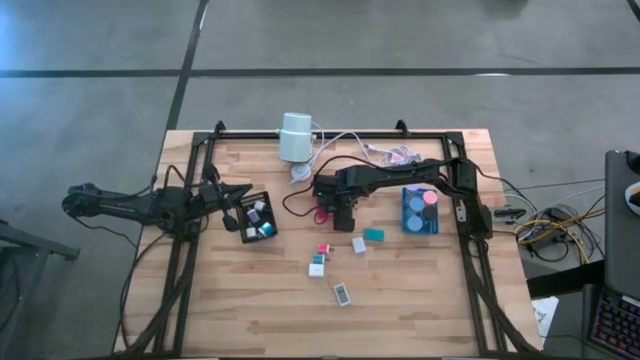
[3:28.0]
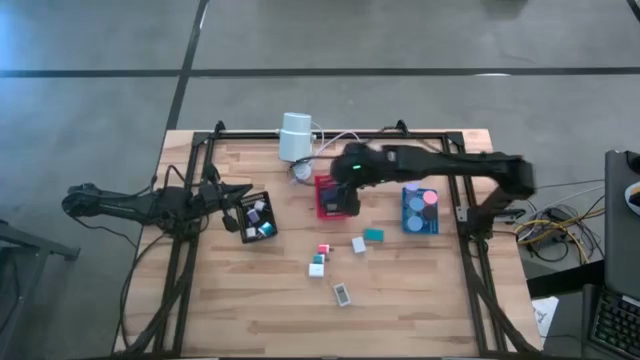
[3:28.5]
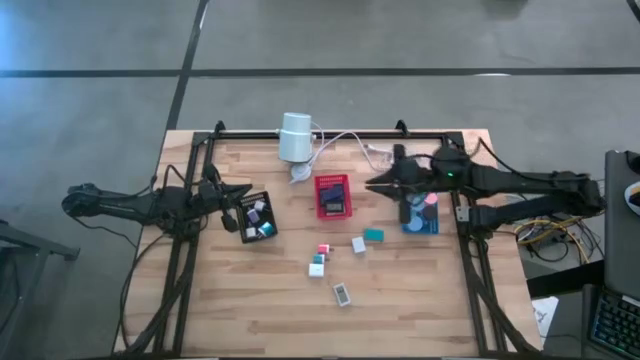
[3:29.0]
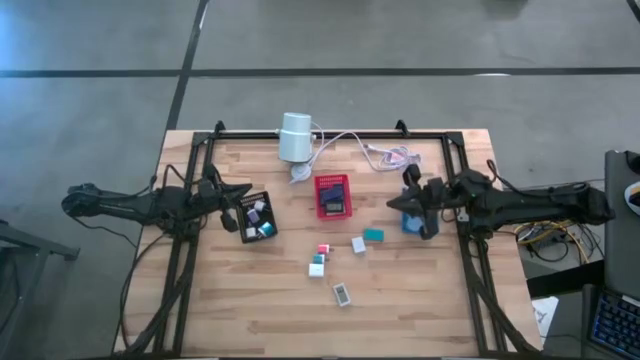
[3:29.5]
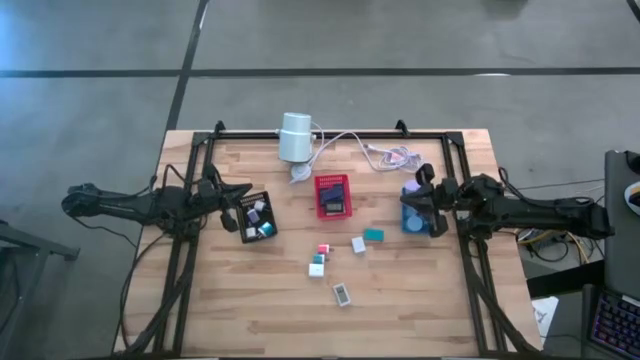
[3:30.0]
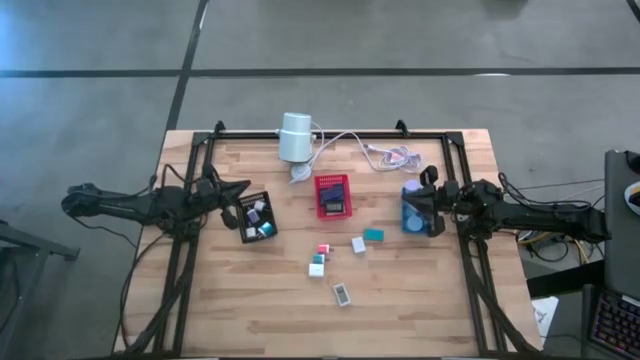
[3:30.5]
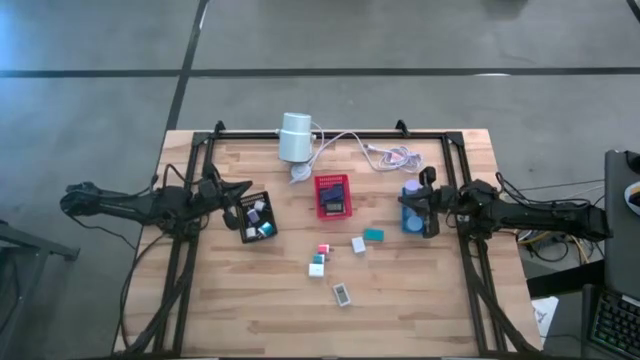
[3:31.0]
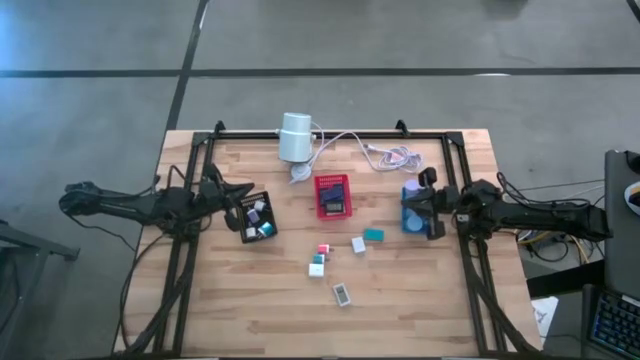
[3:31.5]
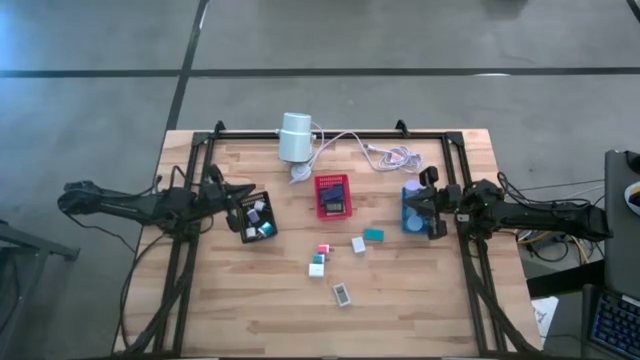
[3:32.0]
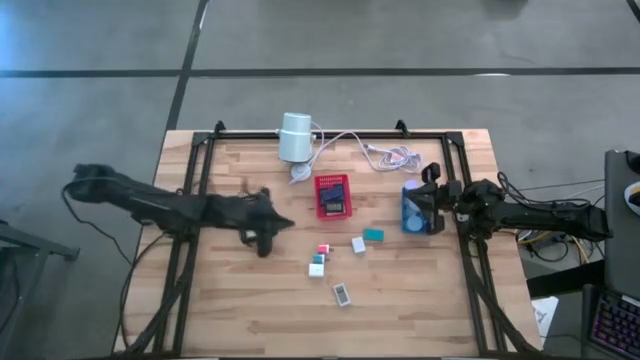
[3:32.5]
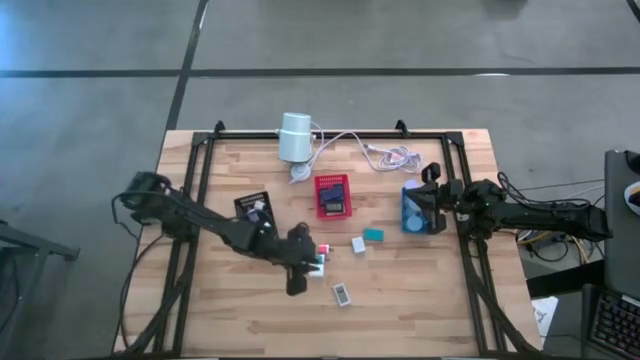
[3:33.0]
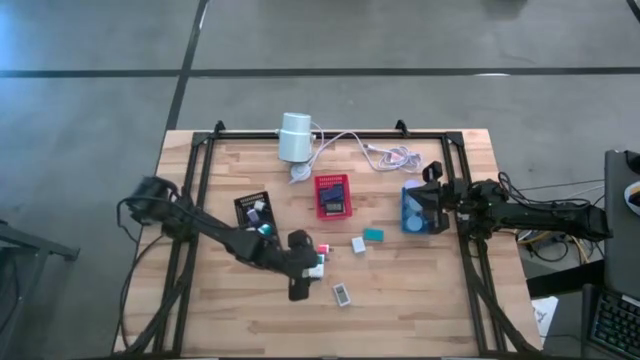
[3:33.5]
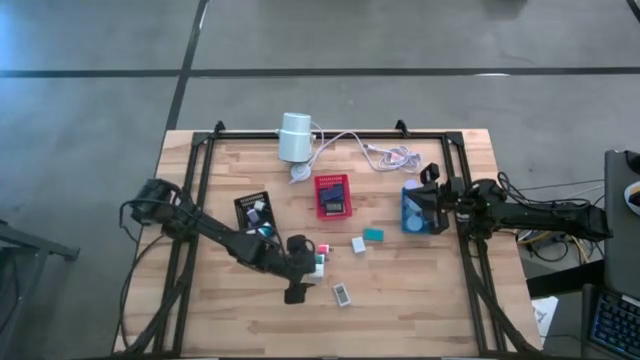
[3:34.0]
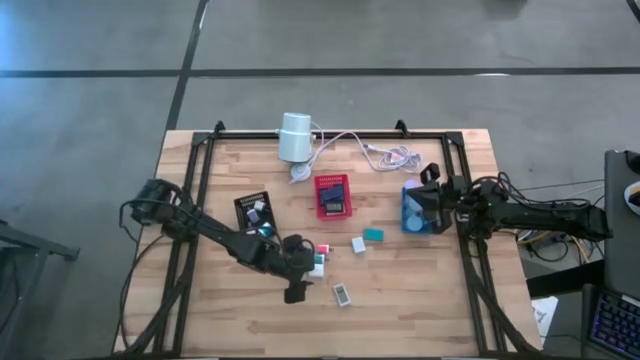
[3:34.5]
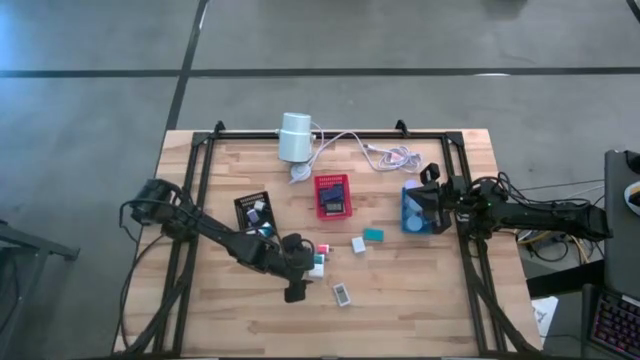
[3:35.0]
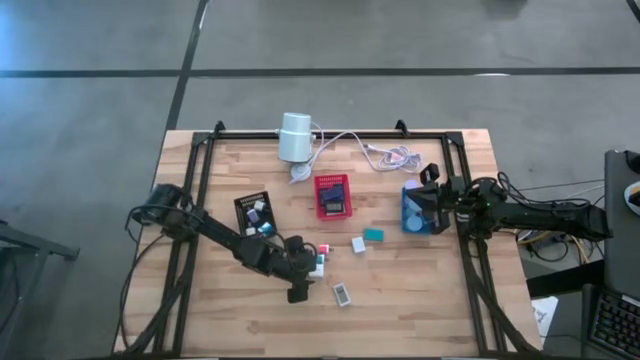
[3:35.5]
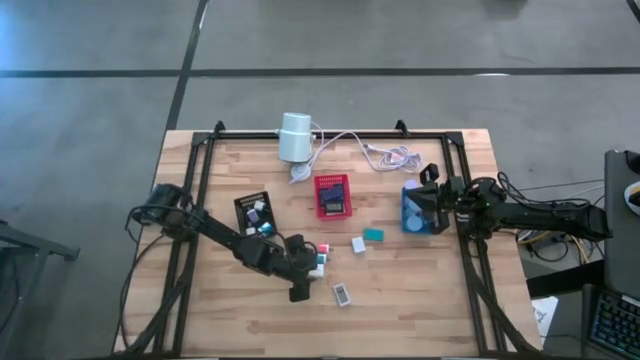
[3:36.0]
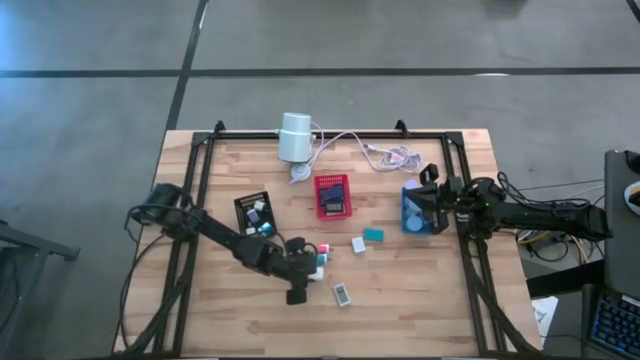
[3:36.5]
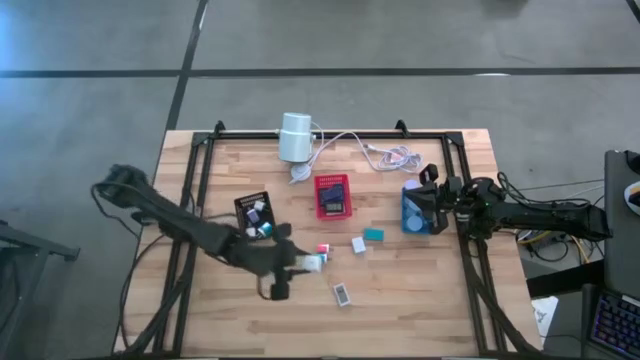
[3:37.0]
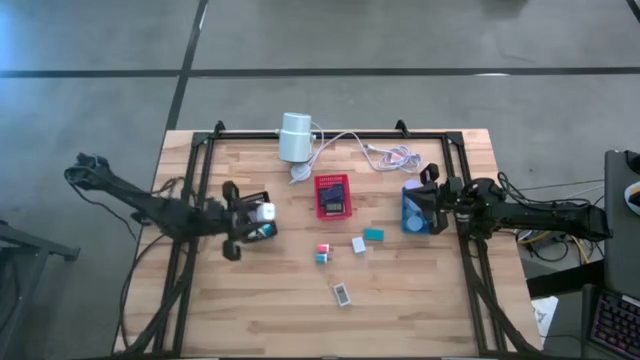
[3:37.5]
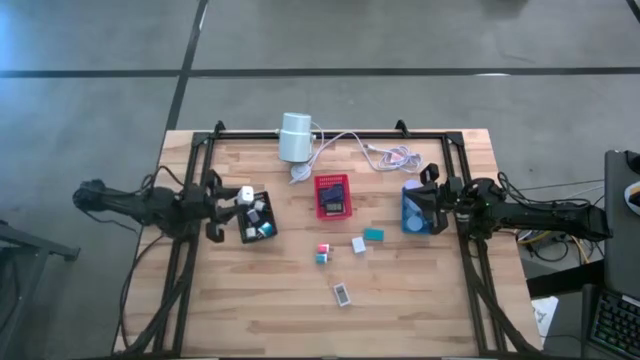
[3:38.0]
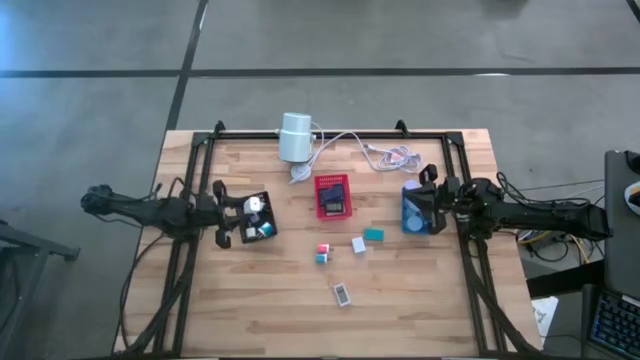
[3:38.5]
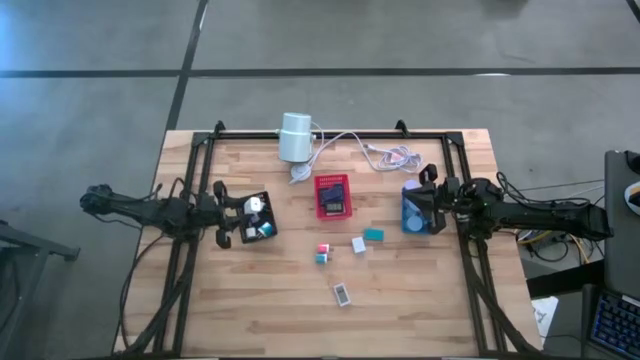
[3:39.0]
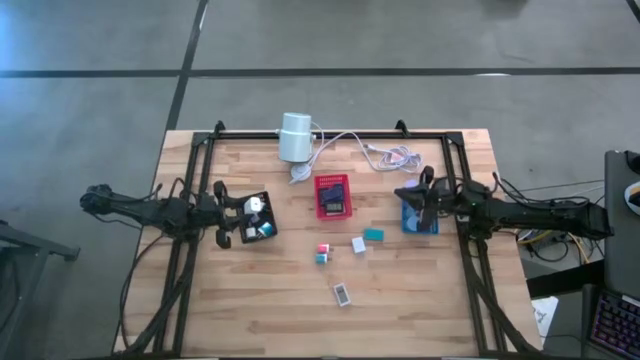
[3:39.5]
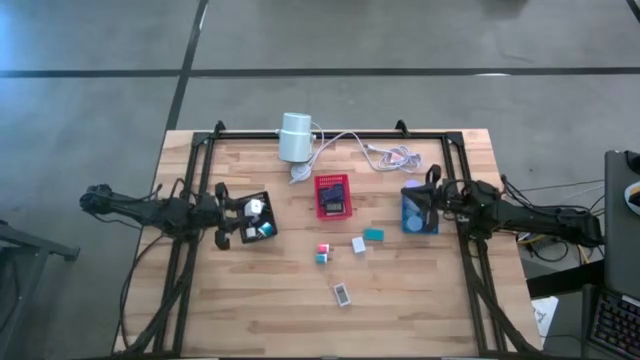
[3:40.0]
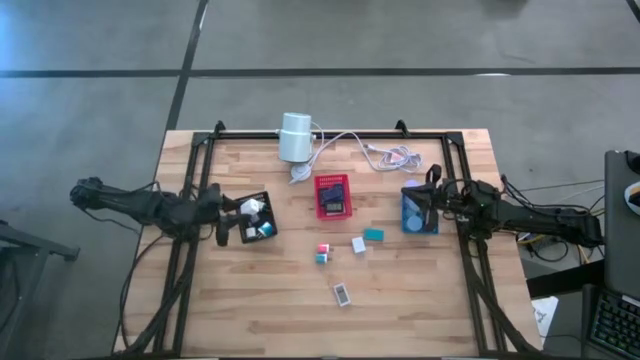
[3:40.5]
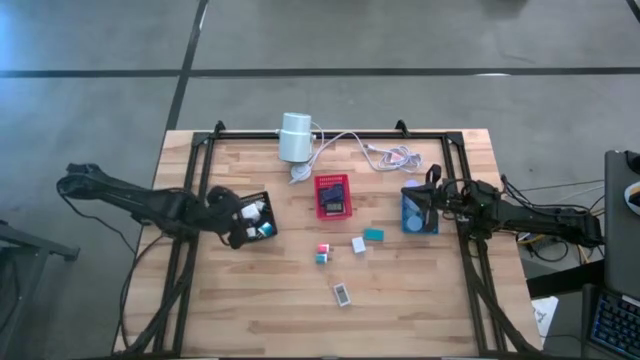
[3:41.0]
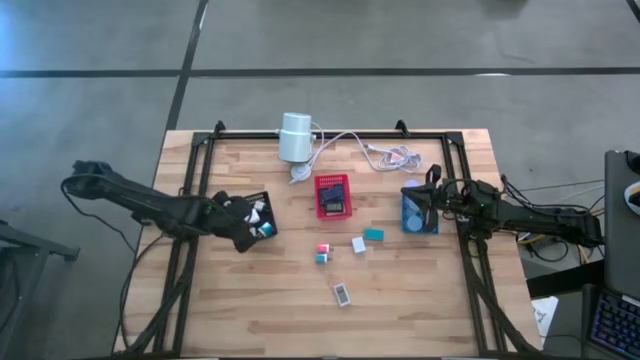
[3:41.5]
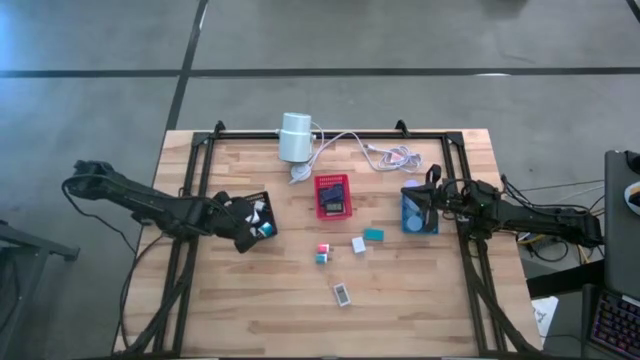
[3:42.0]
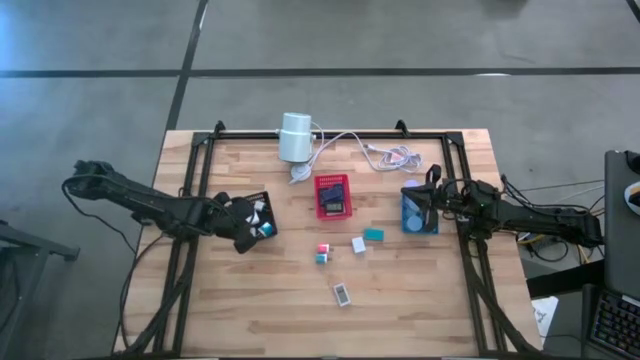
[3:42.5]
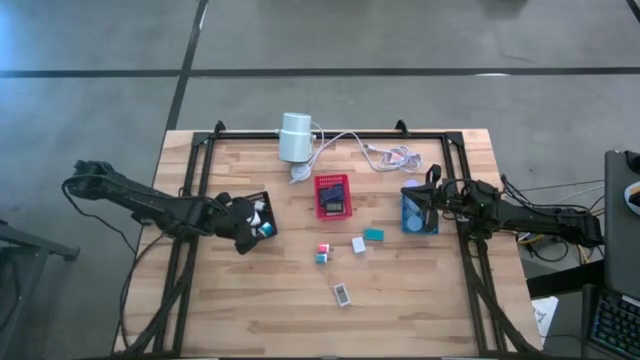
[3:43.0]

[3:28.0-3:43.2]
Task: Pick & Place Office items
Put the left white charger adapter into the black basket

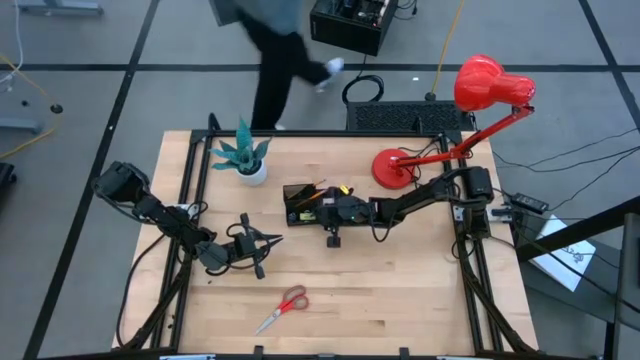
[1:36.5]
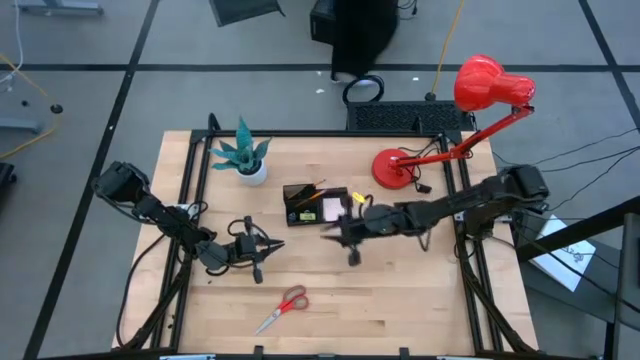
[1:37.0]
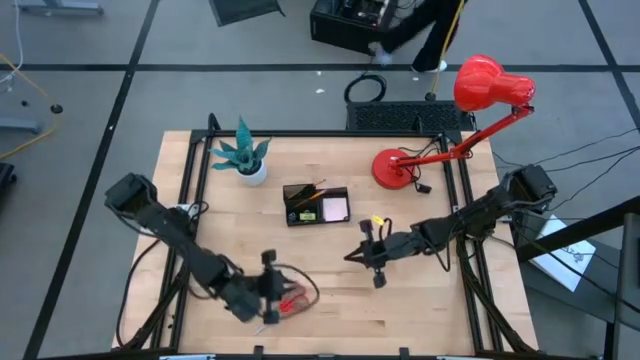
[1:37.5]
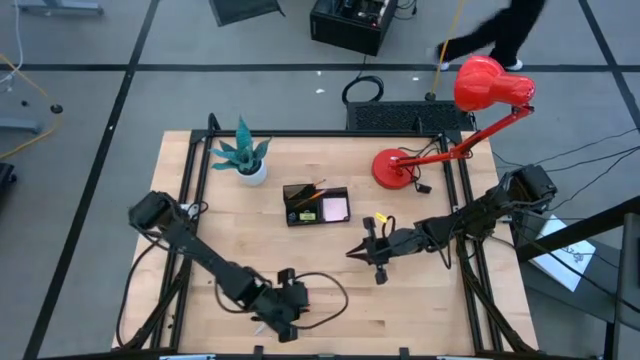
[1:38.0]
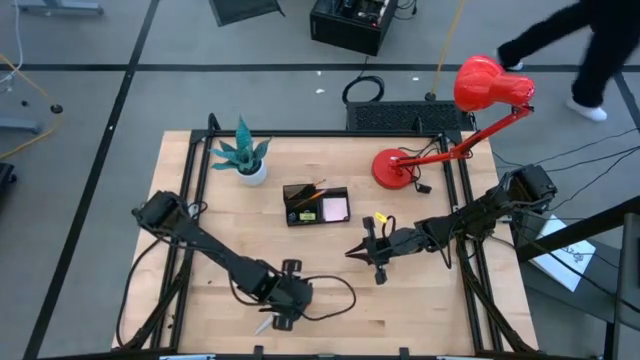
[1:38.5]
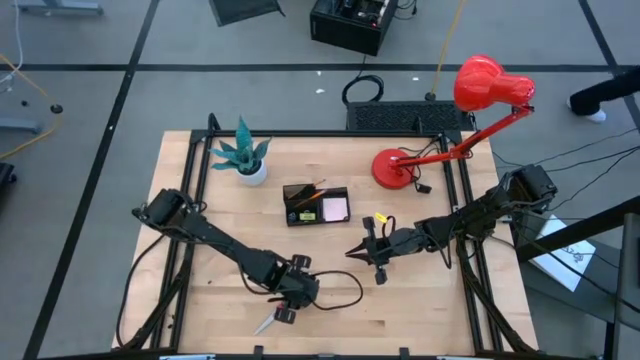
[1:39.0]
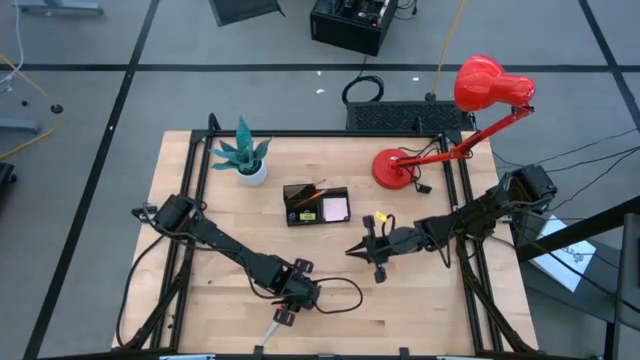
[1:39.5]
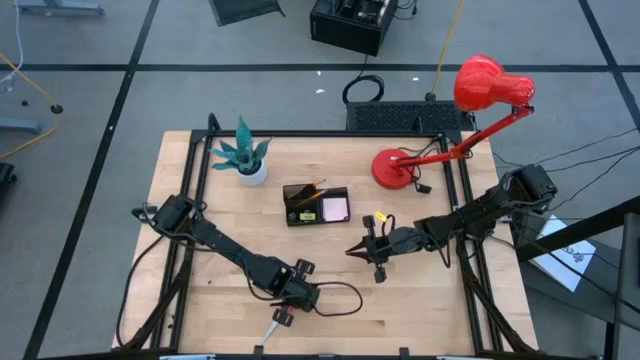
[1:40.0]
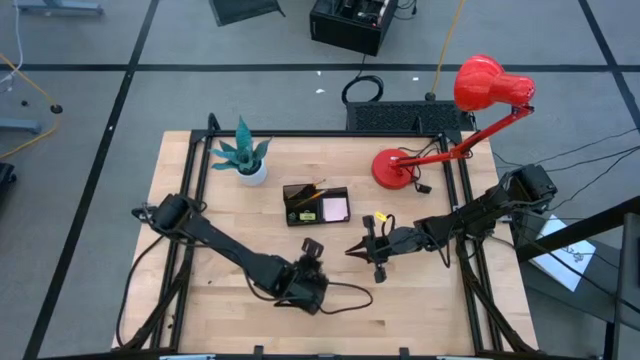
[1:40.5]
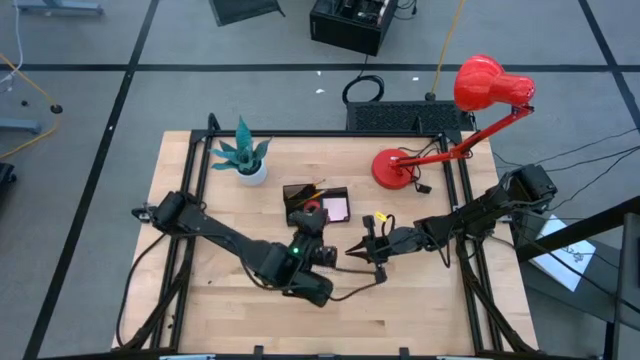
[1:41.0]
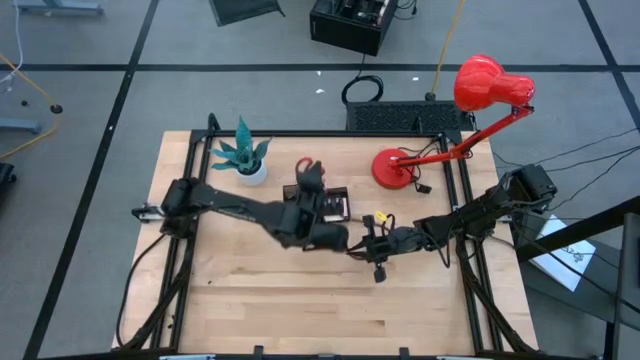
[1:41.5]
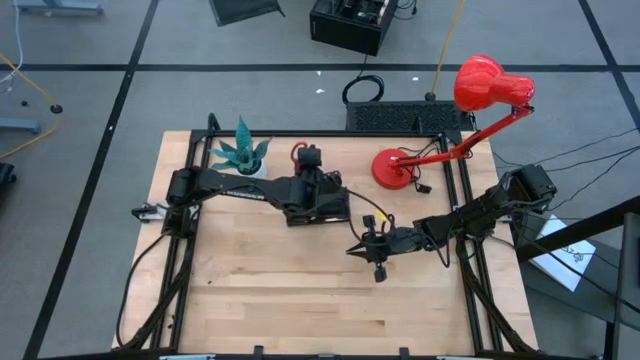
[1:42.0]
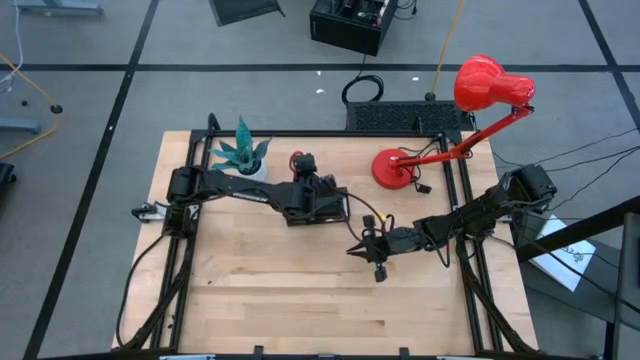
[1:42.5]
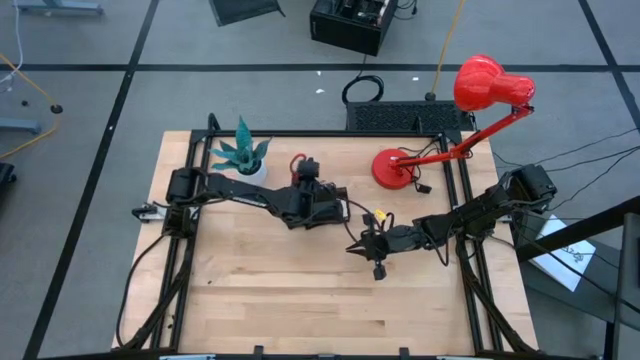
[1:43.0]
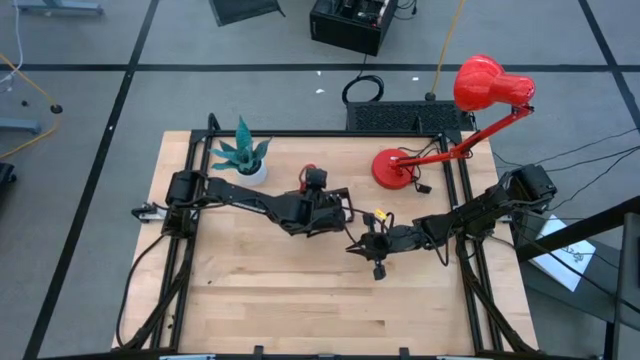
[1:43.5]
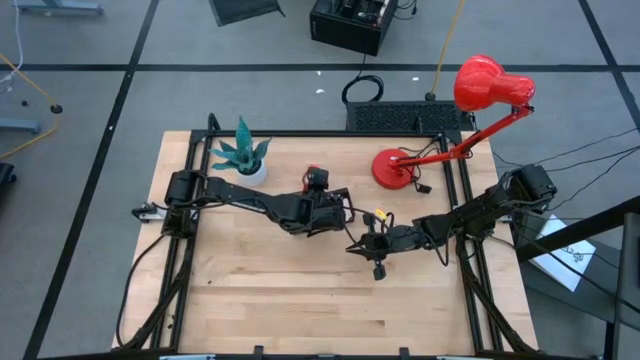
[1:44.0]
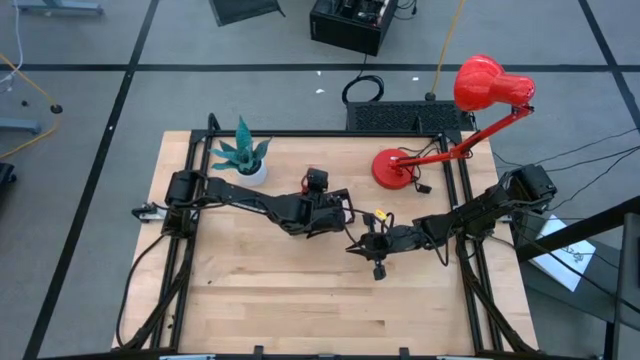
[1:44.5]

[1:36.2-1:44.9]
Task: Pick and place office supplies into organizer
Put the red scissor into the black desk organizer
